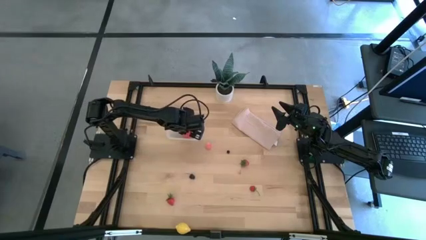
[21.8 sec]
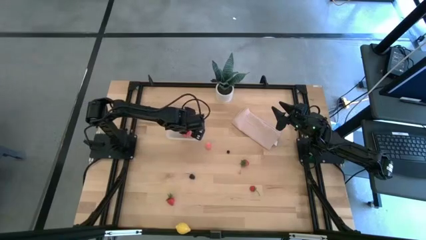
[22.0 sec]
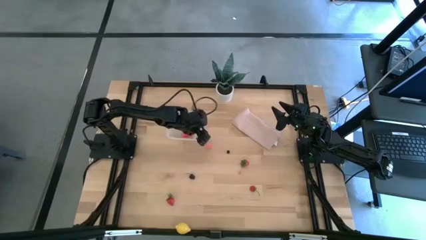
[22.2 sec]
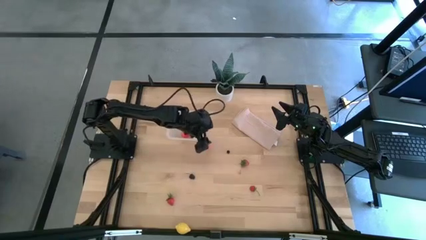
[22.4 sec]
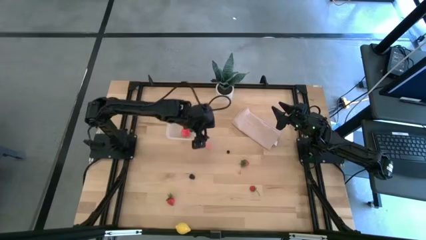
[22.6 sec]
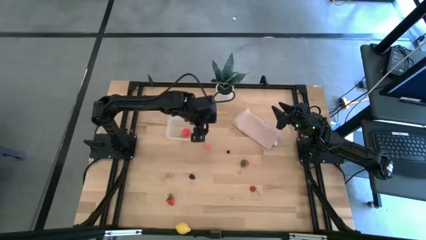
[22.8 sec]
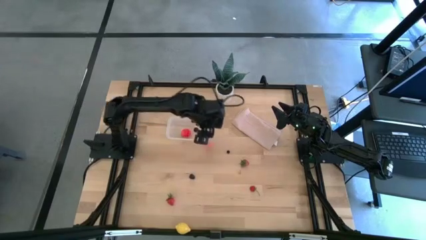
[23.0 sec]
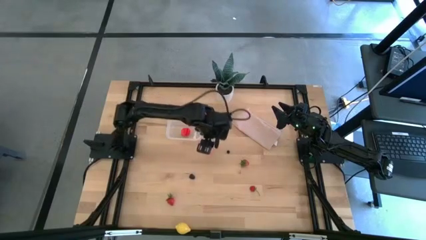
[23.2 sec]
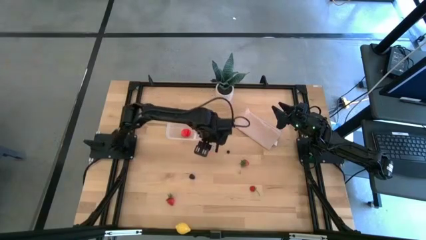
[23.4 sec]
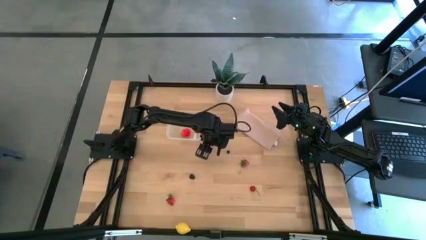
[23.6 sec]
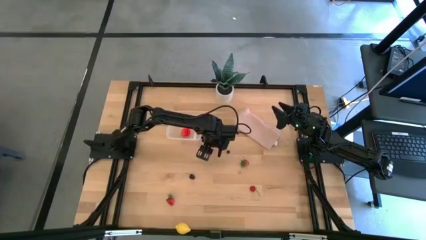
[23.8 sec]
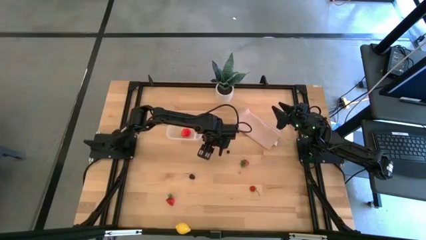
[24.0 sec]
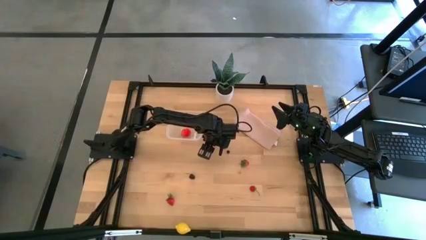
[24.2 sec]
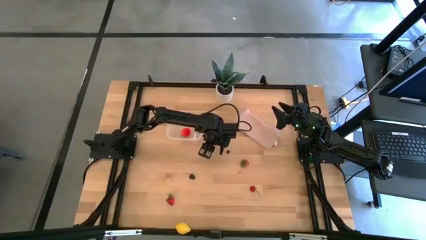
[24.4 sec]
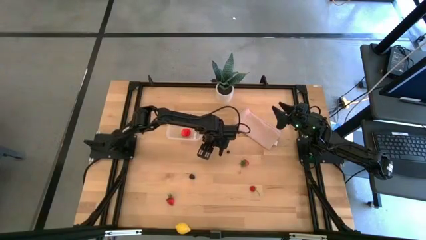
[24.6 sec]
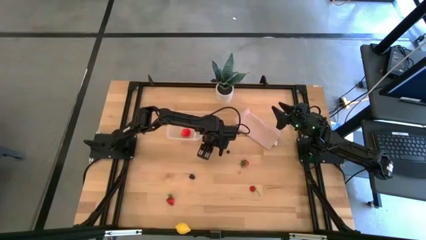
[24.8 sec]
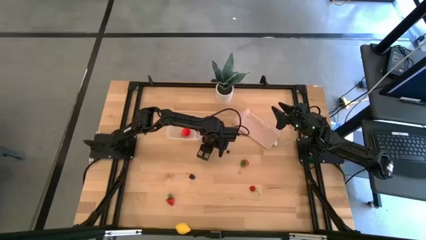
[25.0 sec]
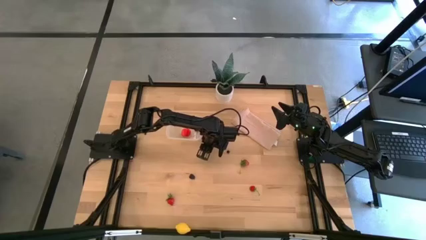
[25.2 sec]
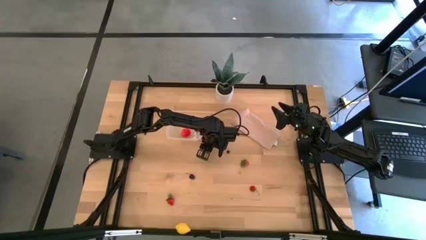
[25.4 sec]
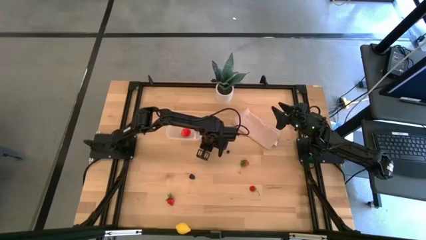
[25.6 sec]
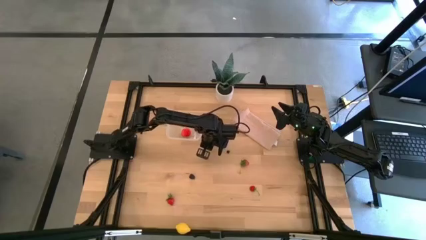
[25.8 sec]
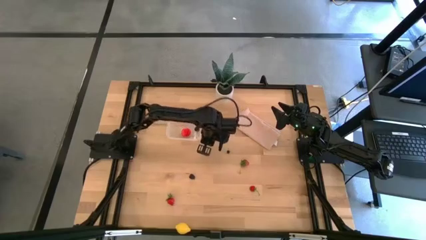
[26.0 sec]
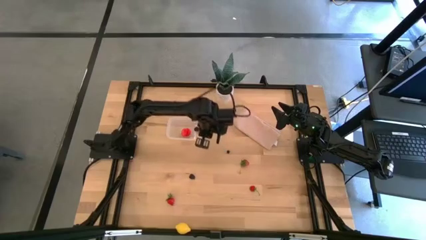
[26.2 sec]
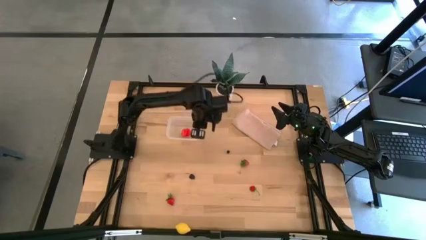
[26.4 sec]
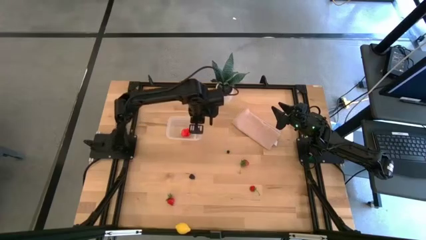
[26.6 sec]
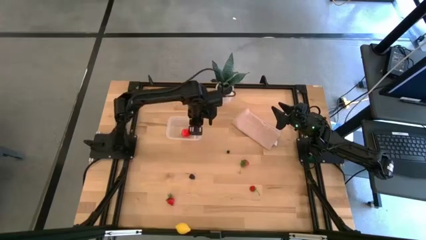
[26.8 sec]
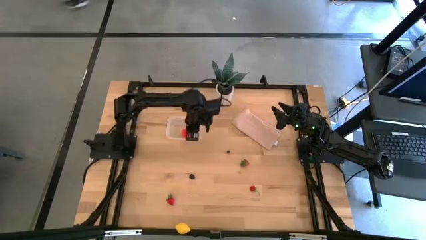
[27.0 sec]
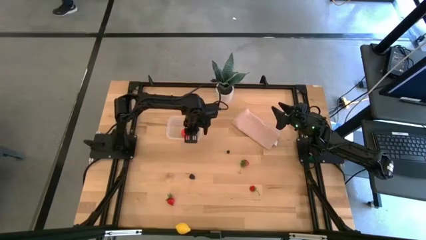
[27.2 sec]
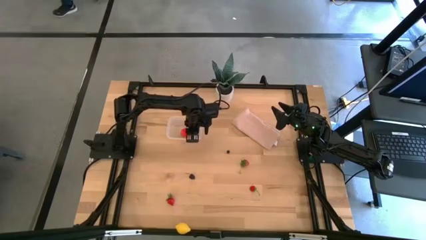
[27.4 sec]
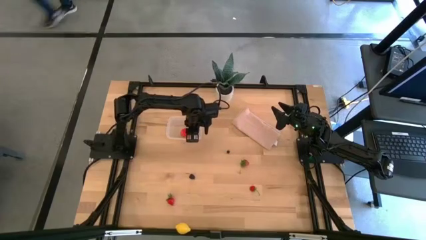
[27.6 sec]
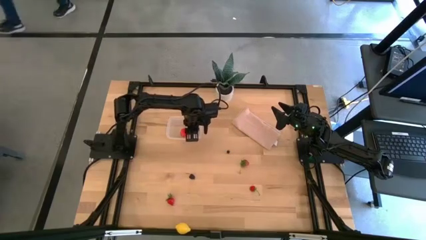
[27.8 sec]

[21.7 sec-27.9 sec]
Task: Pick and placing Produce into tupperware
Put the pink peach into the transparent container

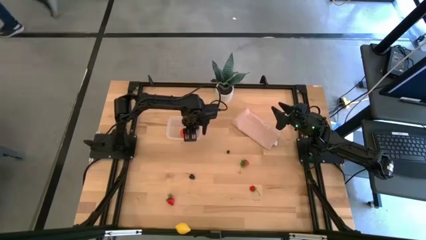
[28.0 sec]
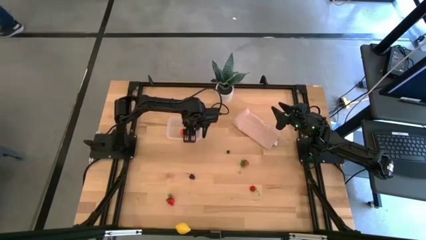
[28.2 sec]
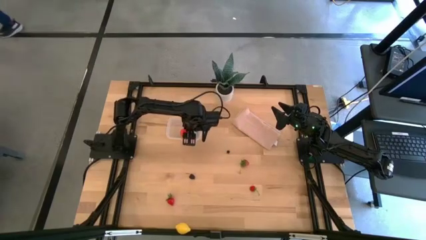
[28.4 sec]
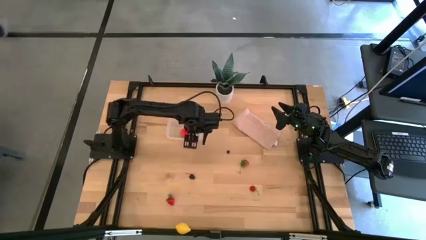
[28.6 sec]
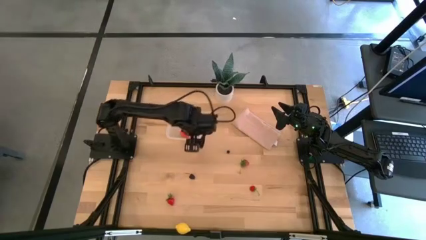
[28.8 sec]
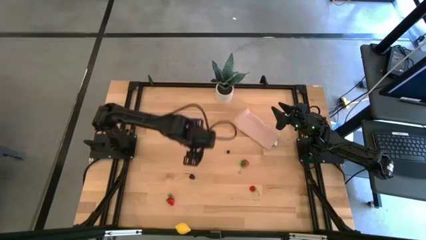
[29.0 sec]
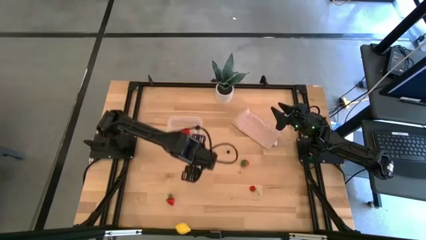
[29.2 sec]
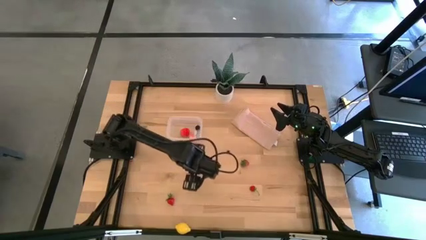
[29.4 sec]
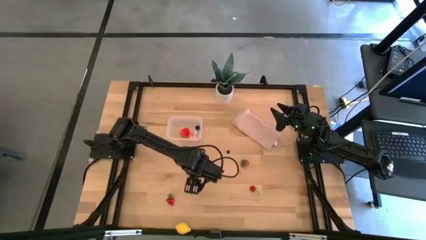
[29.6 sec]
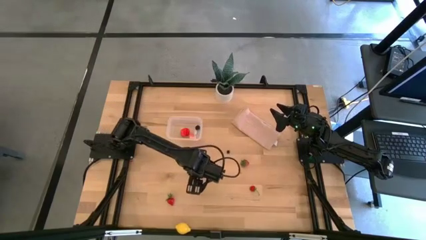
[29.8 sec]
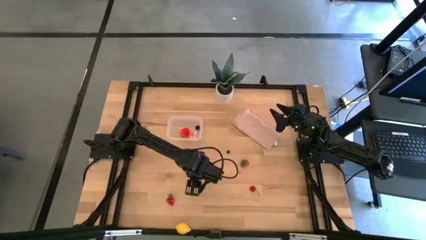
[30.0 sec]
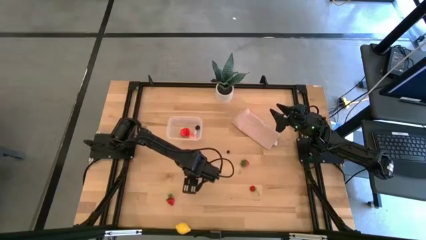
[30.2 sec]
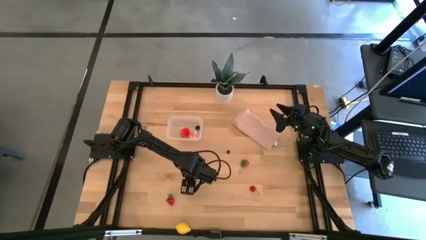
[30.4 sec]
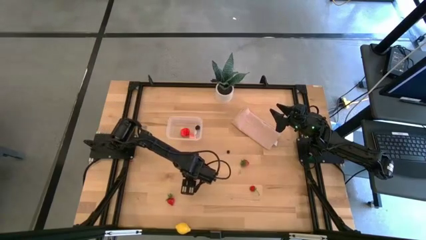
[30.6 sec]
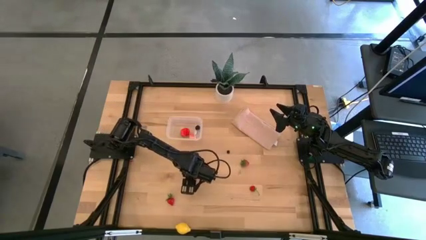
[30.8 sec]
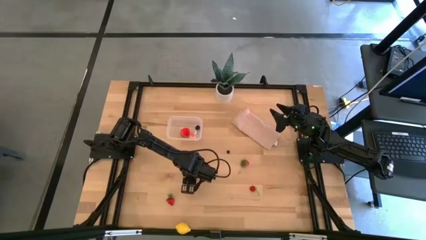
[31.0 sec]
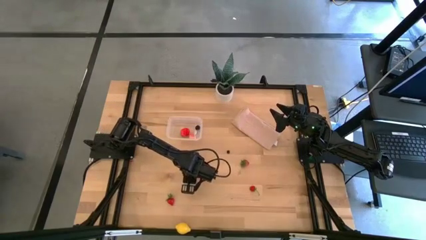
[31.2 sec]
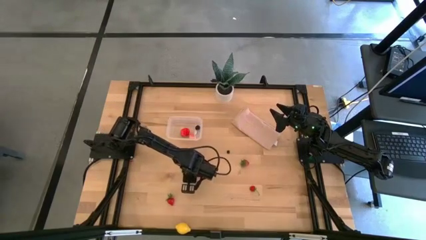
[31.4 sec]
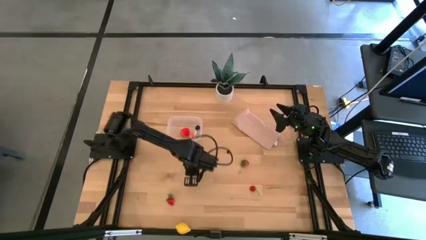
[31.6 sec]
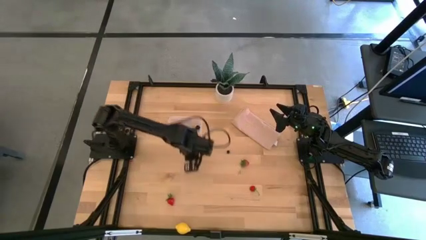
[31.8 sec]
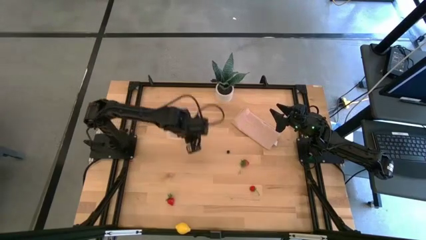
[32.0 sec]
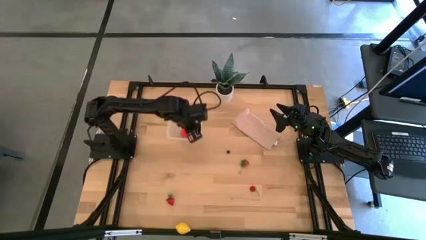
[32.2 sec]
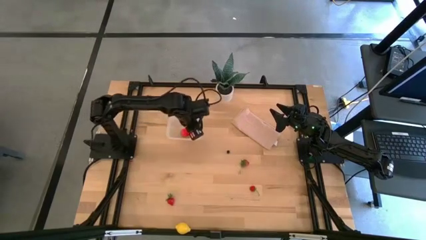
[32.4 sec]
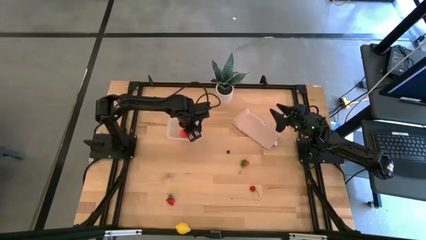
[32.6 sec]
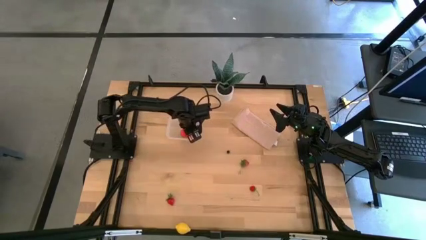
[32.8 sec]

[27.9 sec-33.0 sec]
Put the blackberry into the transparent container

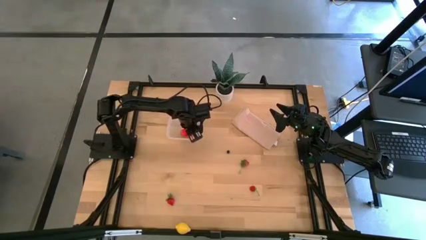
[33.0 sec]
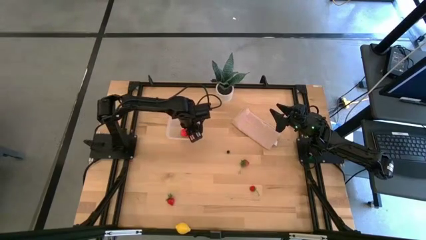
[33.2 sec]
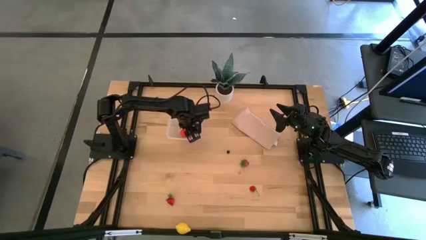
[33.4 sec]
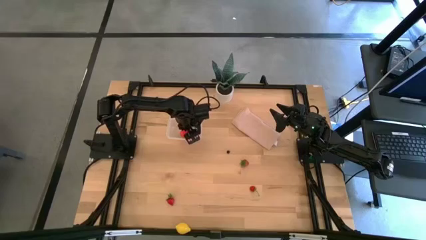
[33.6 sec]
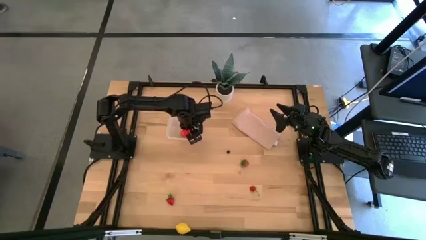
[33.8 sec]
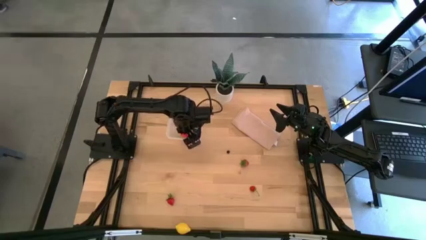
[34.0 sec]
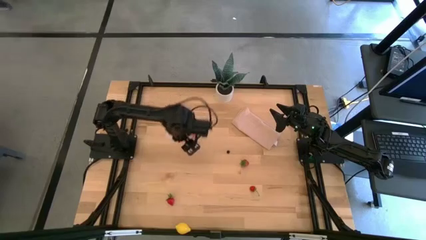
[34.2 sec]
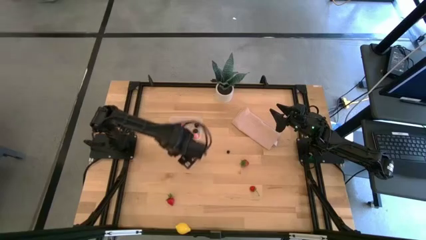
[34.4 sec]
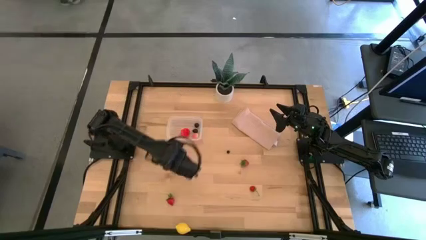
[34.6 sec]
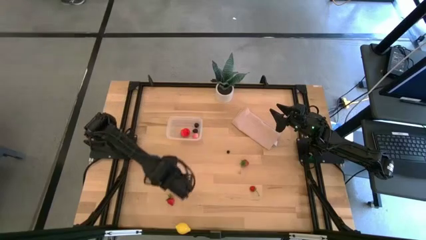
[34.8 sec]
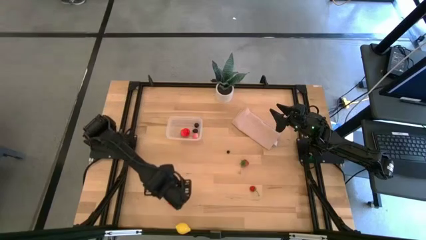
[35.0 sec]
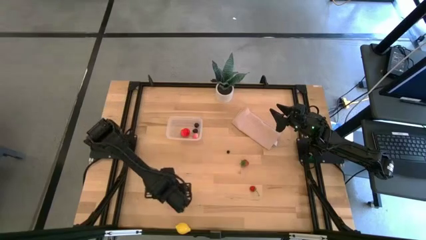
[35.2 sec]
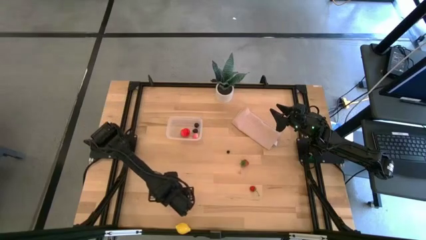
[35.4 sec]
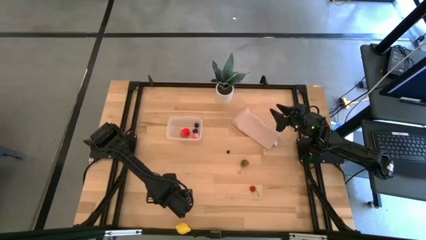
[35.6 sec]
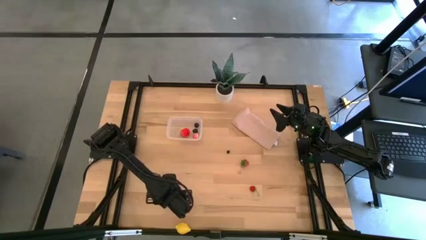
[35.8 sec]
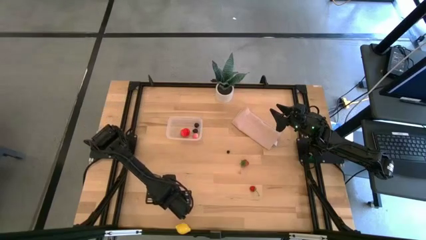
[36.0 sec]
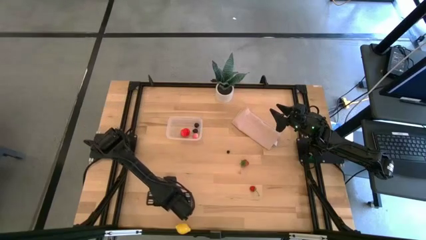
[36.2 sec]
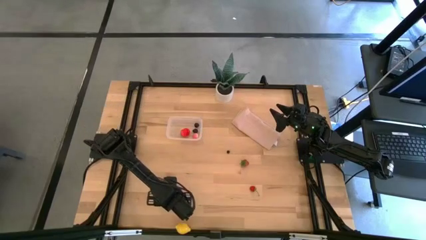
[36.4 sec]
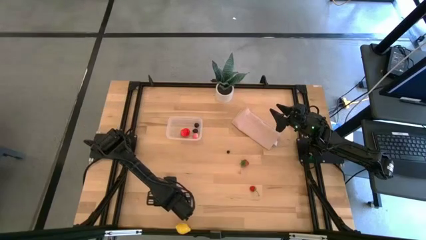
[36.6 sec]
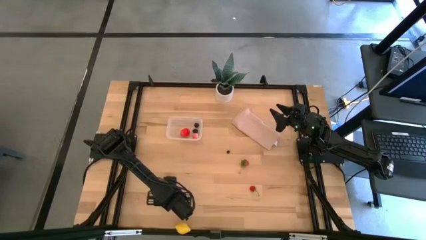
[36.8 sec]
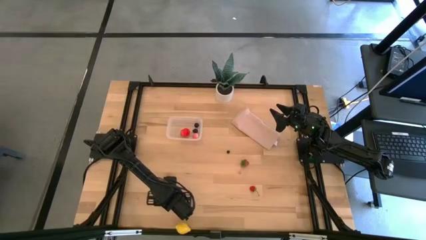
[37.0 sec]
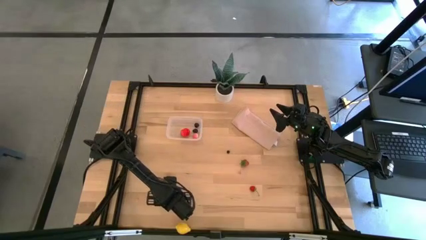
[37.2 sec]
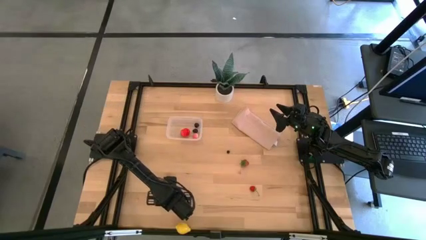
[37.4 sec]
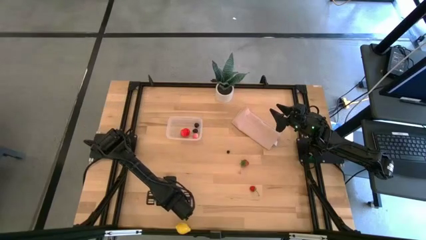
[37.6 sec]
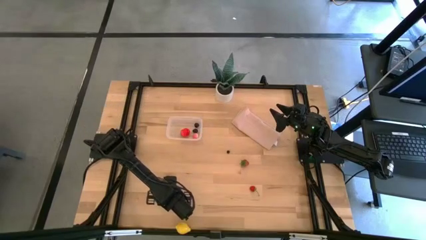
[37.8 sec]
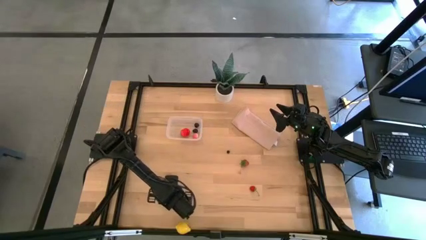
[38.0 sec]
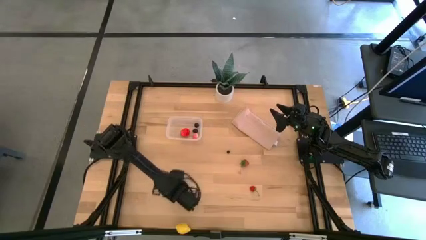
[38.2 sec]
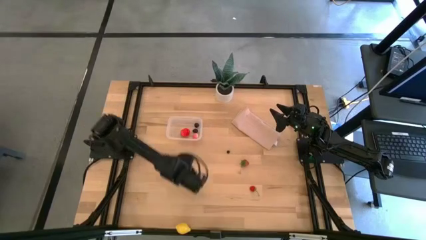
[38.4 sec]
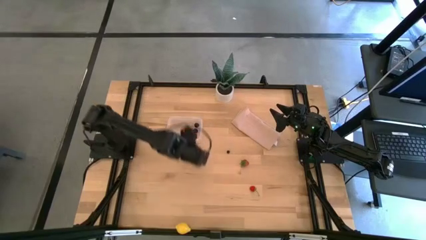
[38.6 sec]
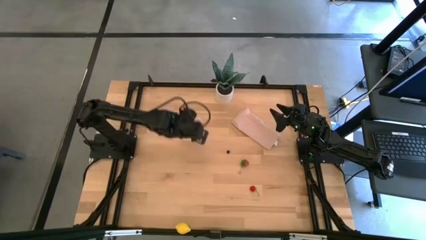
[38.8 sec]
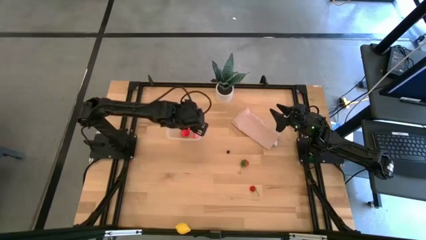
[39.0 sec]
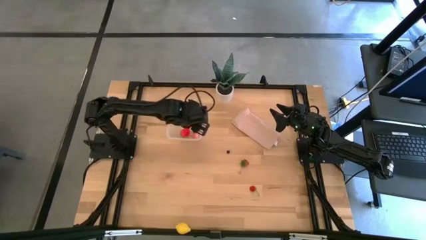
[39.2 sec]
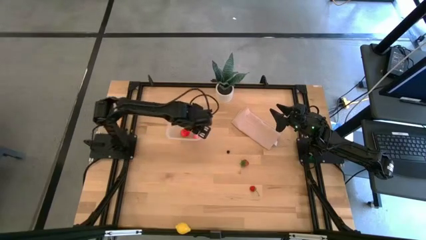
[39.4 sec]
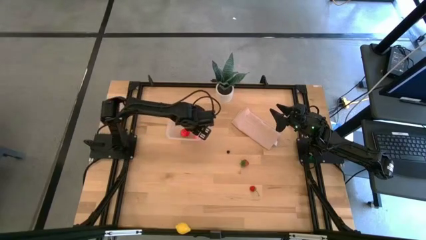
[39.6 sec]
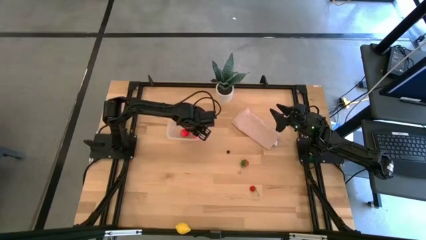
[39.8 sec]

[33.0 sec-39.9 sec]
Put the red strawberry into the transparent container
